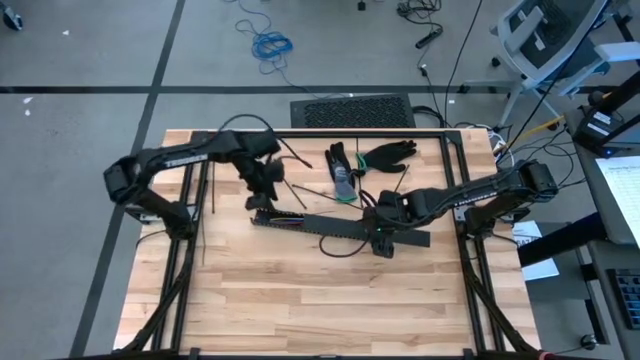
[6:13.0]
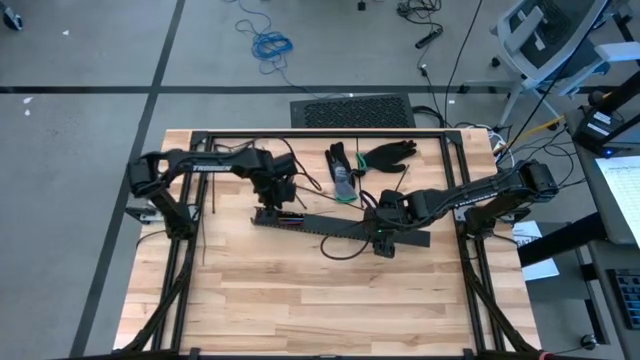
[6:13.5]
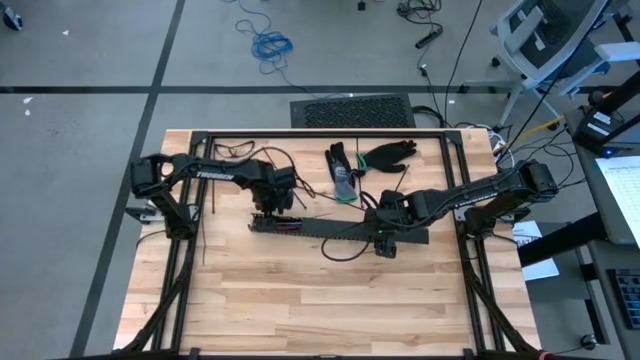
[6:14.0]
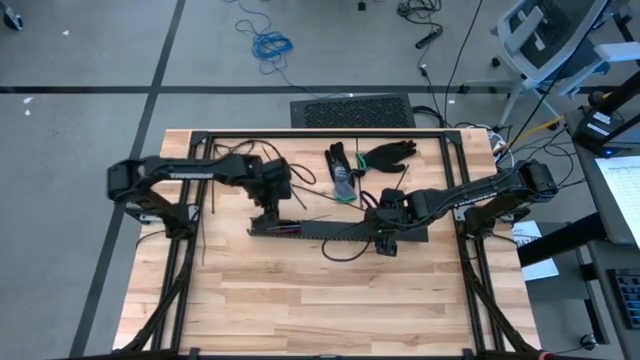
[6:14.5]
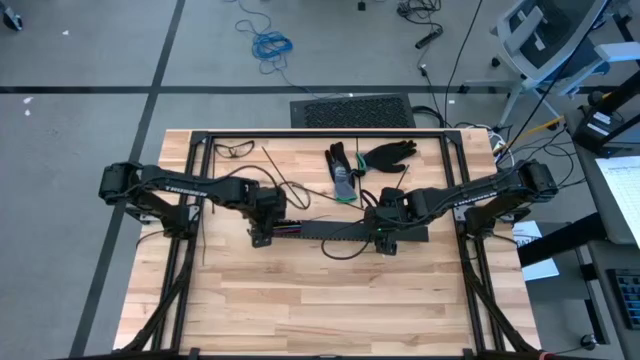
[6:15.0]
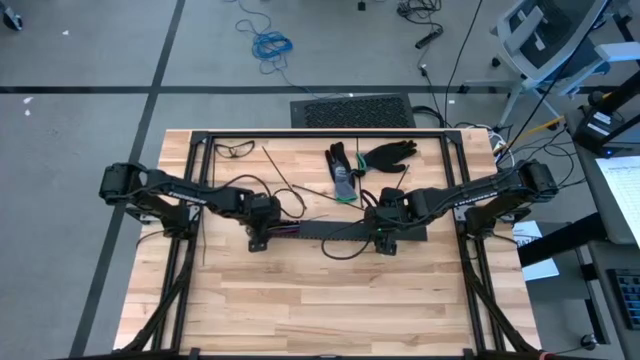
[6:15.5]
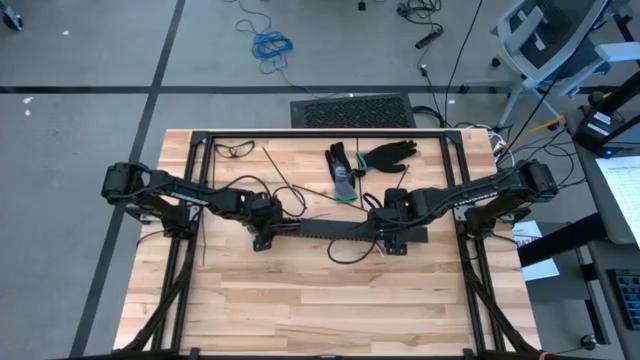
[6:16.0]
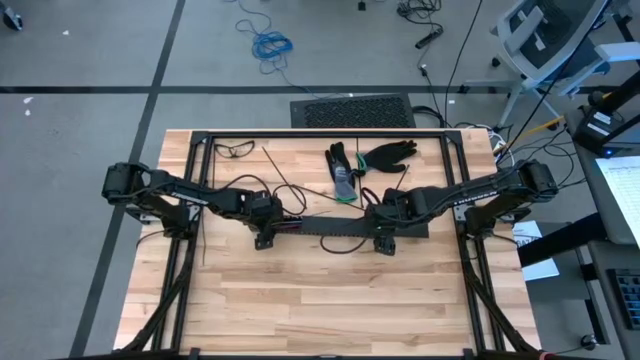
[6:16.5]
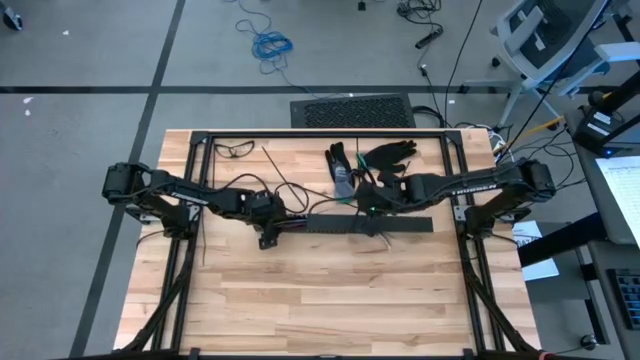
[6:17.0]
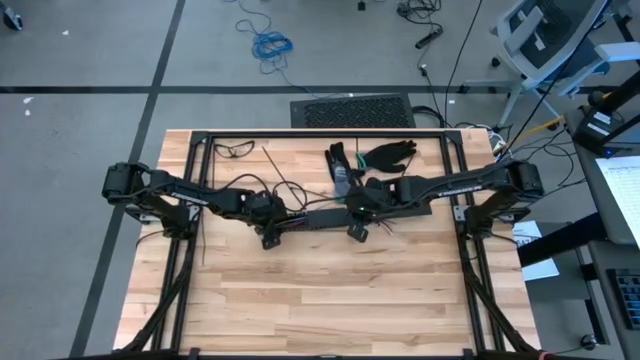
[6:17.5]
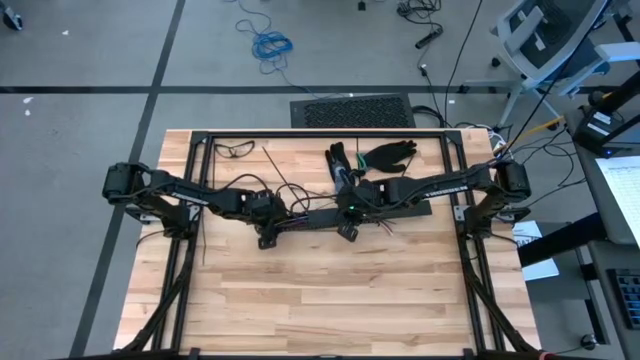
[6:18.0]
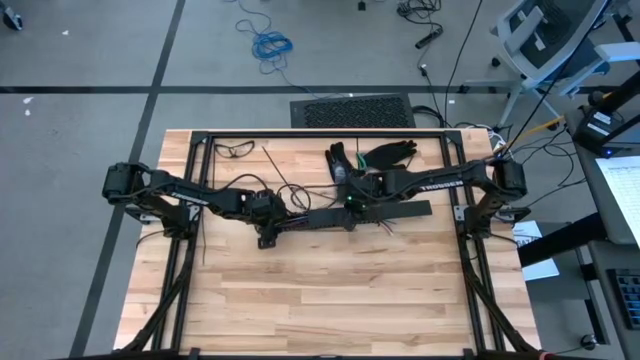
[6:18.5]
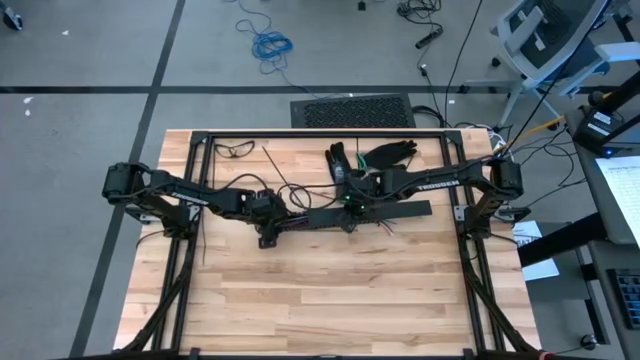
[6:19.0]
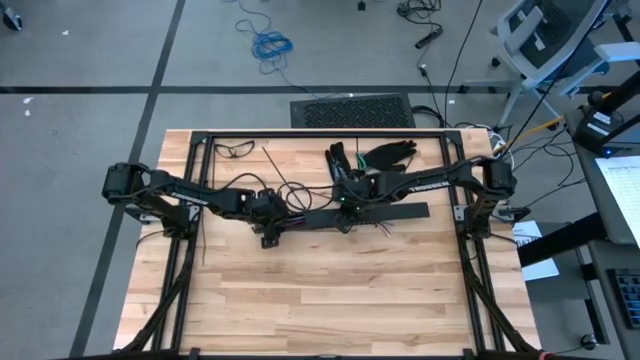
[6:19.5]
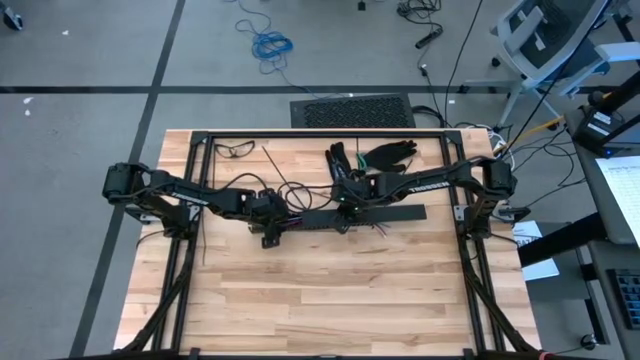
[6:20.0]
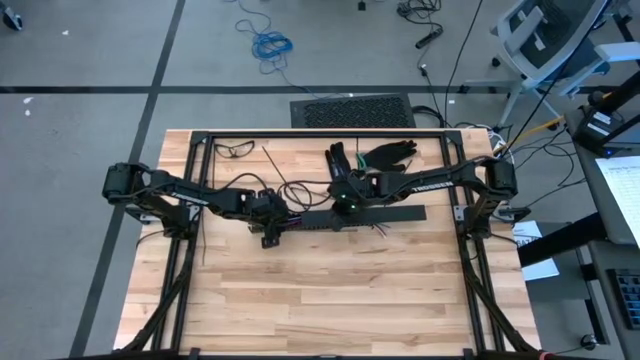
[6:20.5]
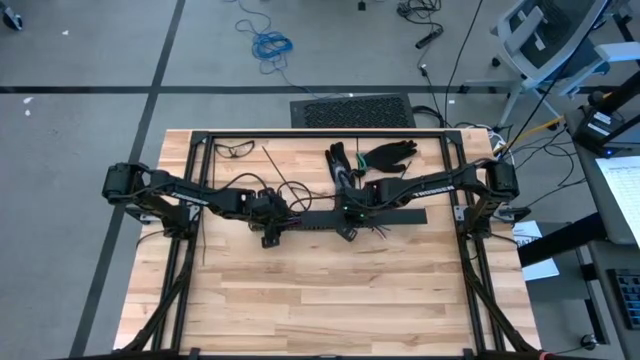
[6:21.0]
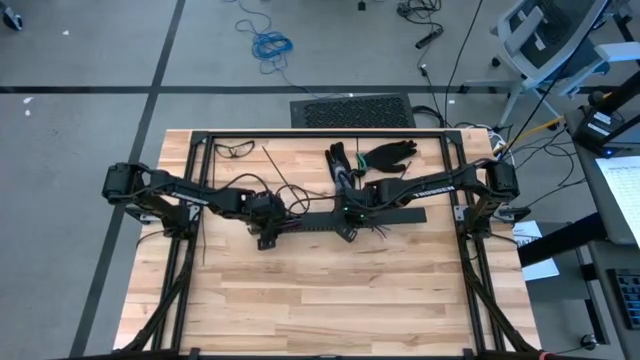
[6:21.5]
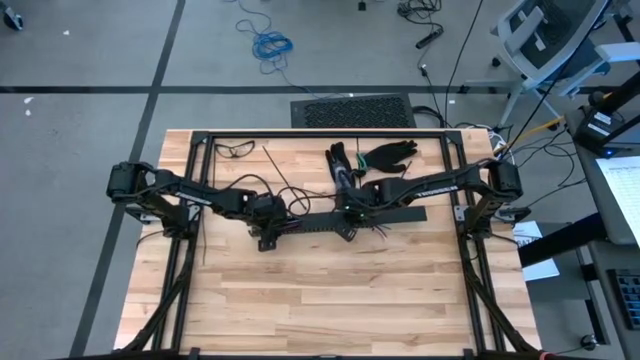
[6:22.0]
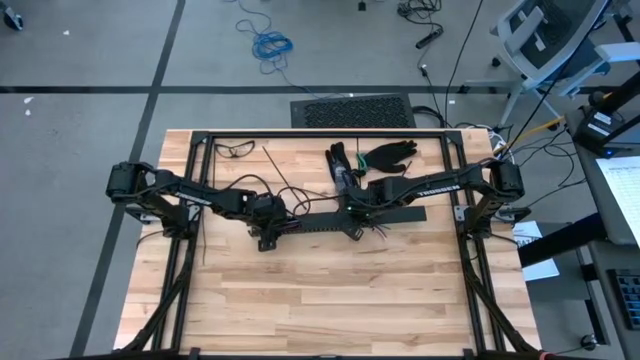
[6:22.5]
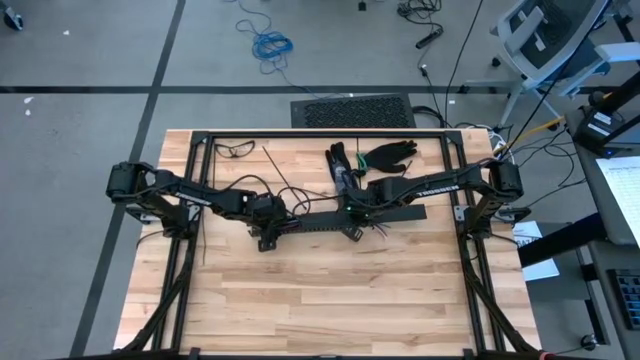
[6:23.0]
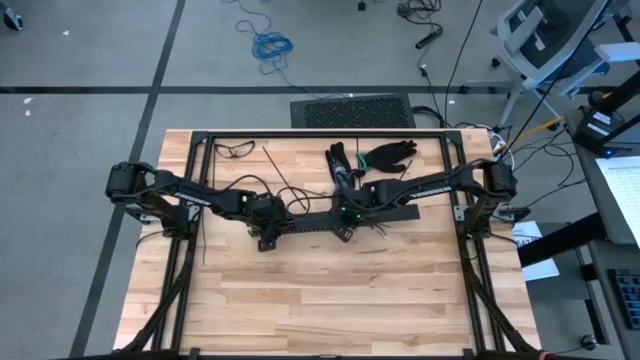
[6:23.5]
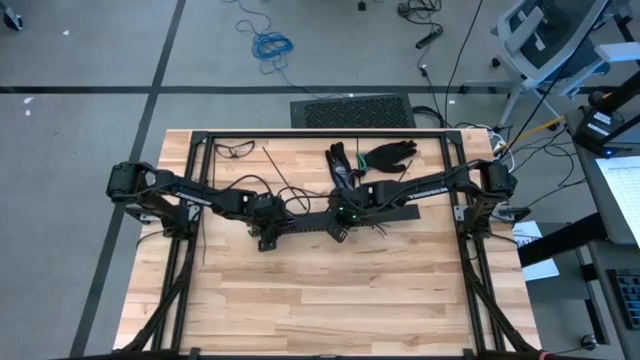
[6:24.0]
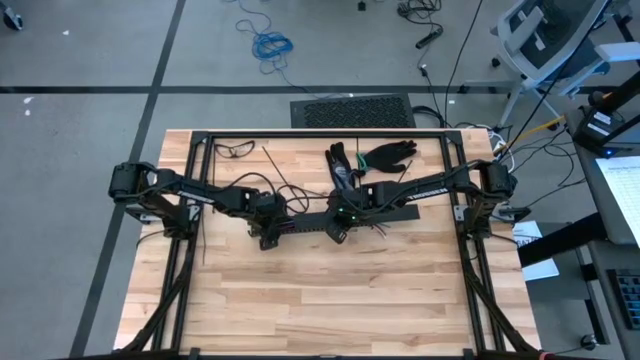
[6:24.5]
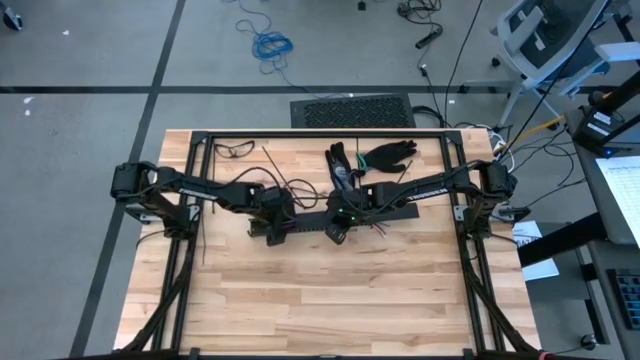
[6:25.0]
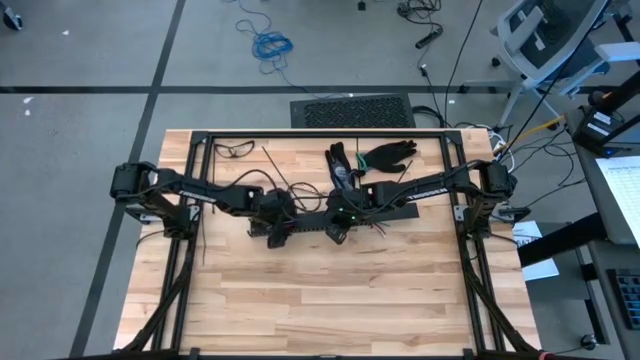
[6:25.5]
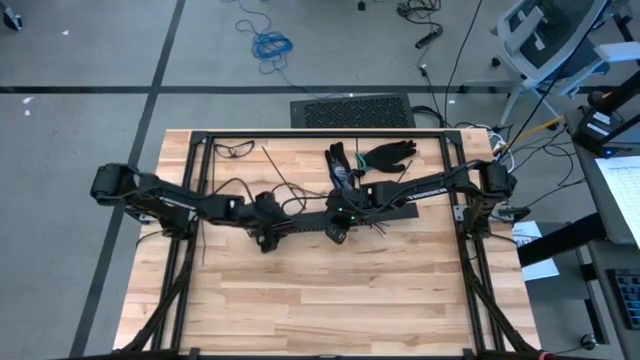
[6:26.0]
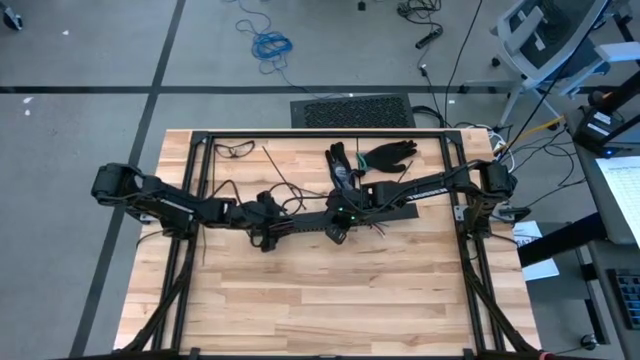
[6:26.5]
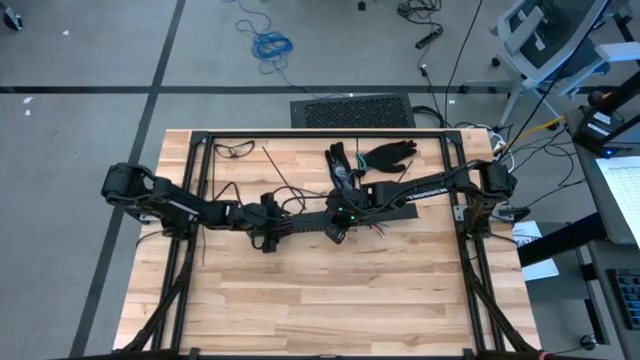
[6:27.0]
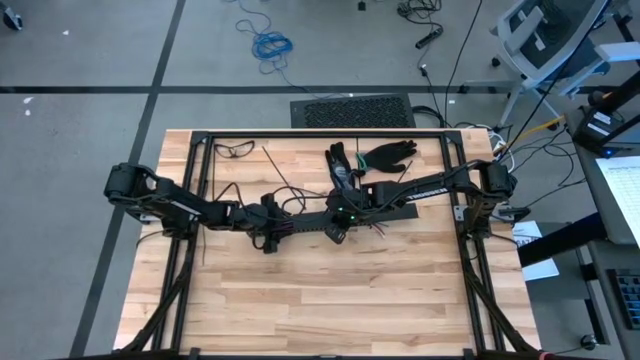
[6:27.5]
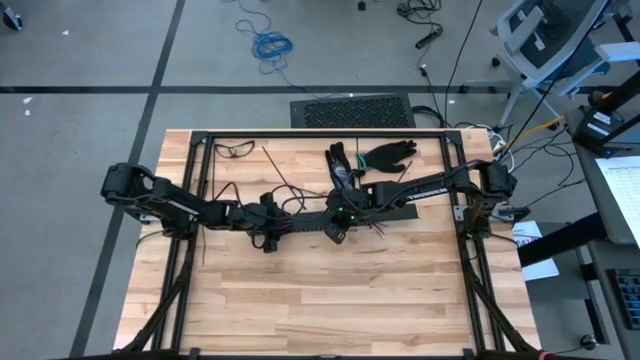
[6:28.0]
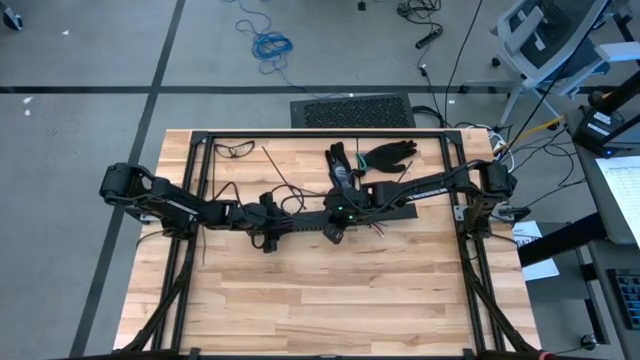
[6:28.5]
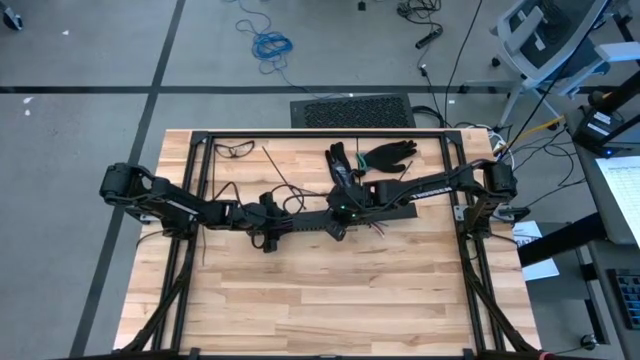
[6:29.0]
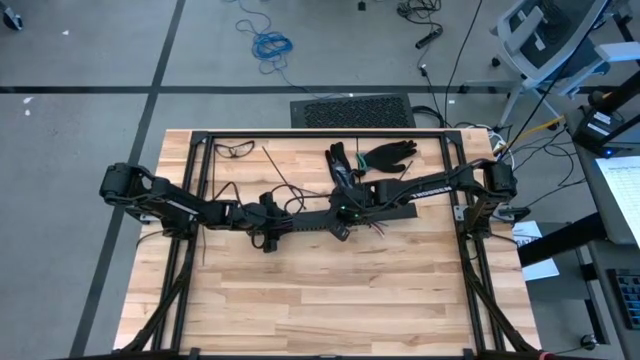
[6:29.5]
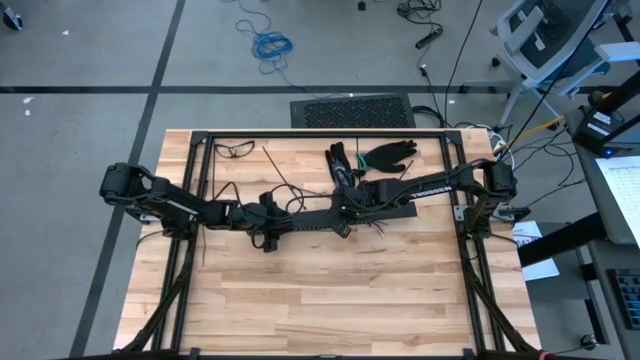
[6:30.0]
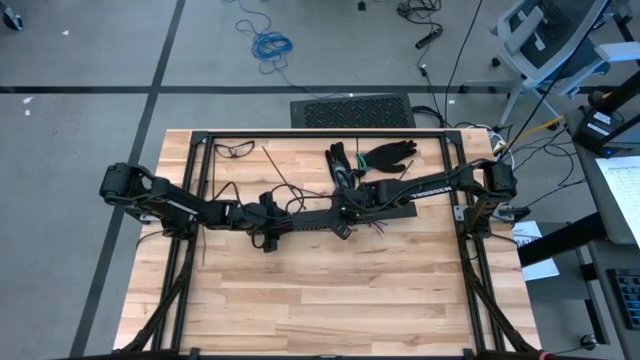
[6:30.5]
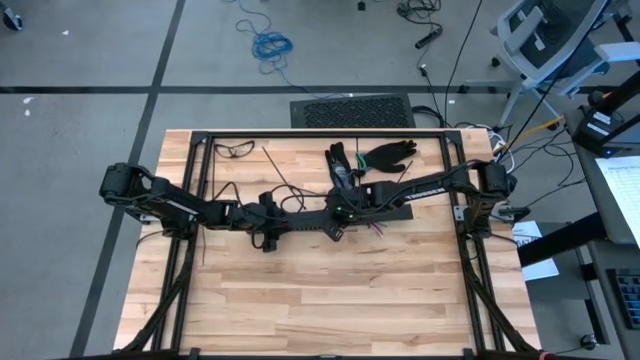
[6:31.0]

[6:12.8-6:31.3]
Task: Ziptie cables
Close the black cable duct

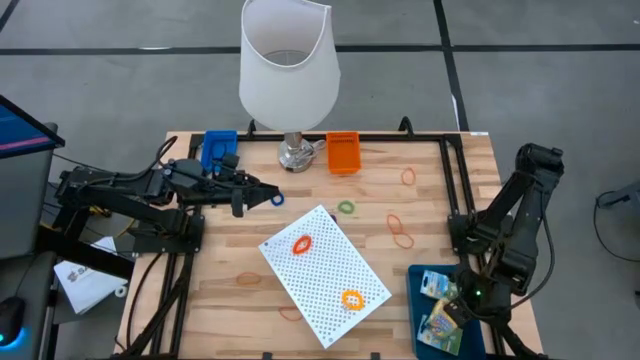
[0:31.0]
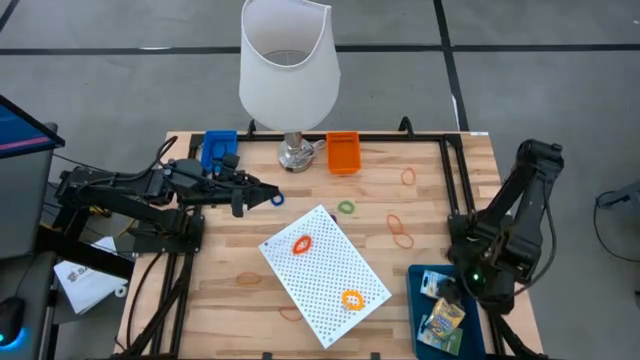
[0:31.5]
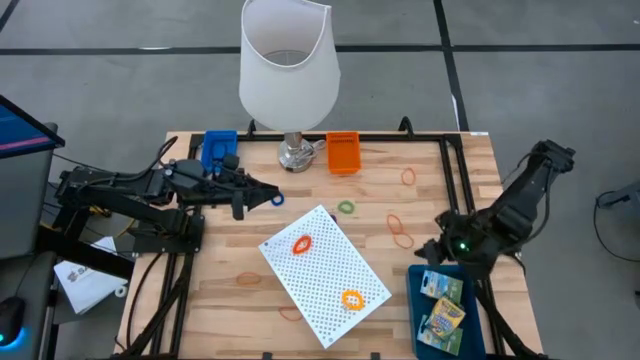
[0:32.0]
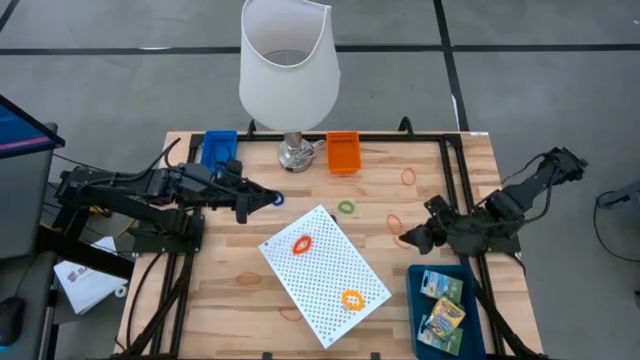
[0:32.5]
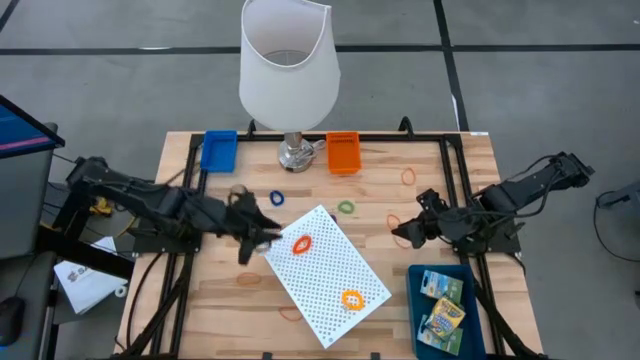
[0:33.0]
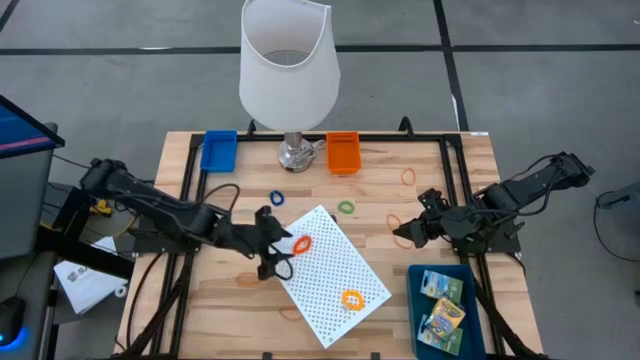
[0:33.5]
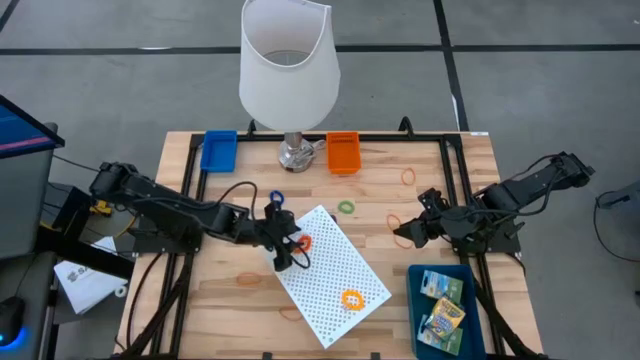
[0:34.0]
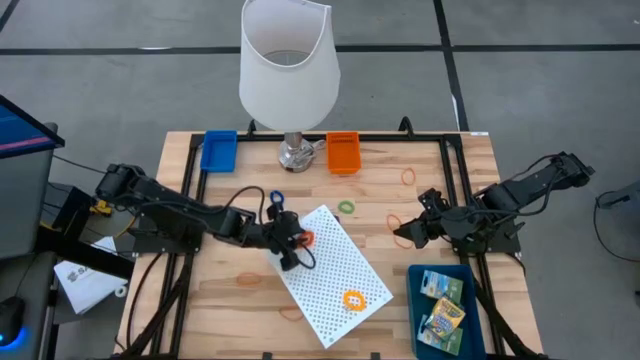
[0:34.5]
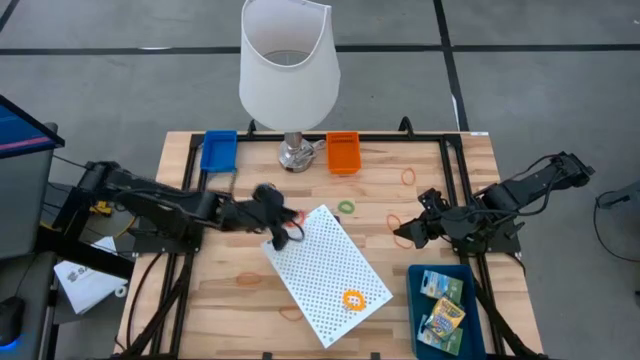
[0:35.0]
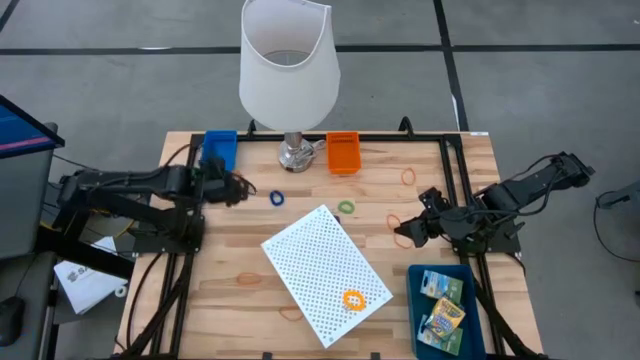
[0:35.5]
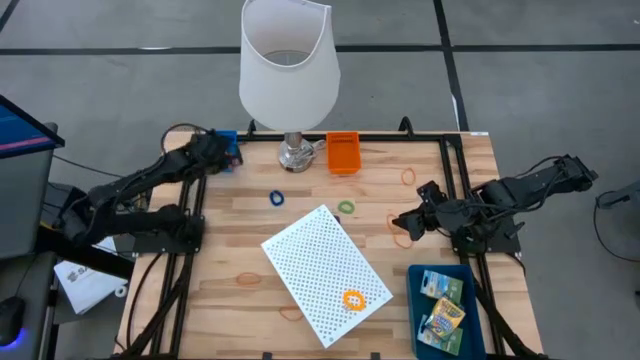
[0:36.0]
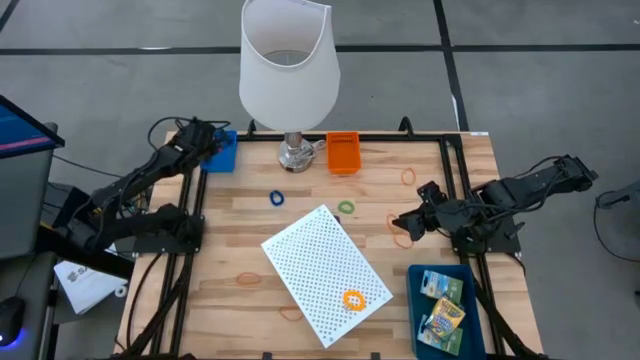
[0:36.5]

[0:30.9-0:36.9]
Task: Pick & Place Office Desk Supplies
Put the orange spring keychain into the blue bin
